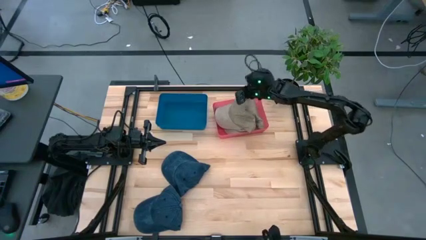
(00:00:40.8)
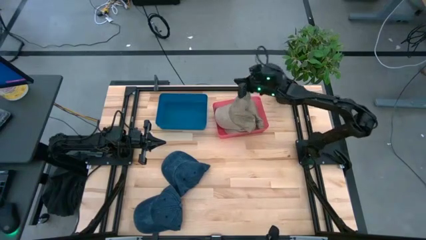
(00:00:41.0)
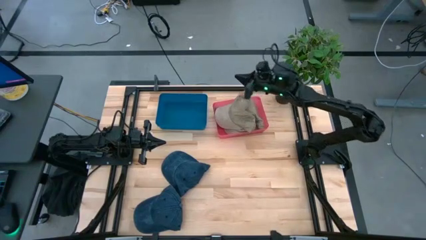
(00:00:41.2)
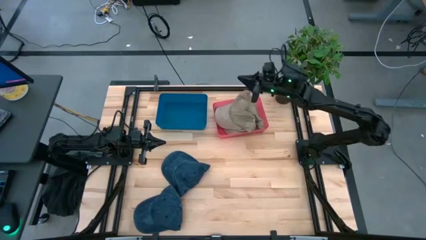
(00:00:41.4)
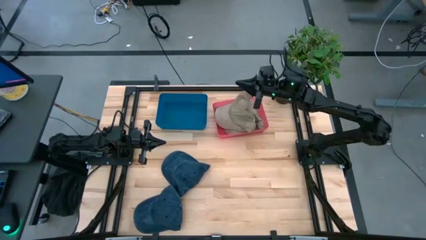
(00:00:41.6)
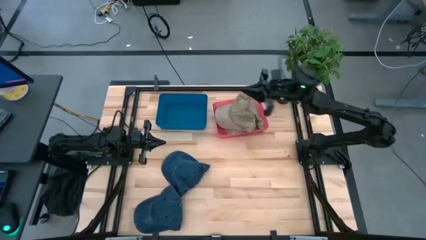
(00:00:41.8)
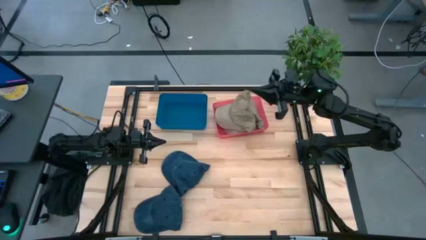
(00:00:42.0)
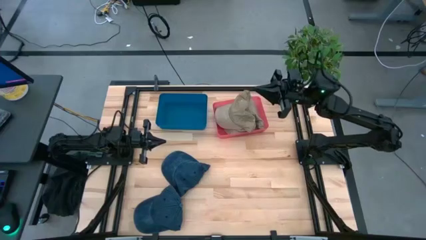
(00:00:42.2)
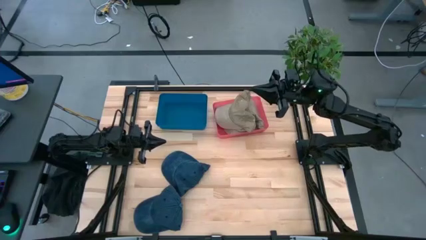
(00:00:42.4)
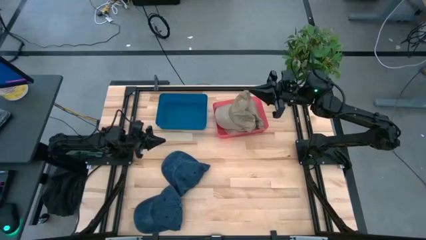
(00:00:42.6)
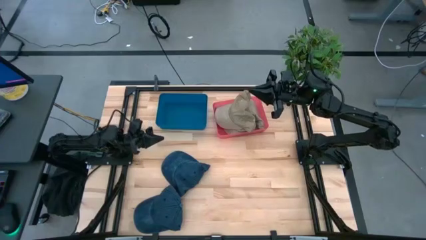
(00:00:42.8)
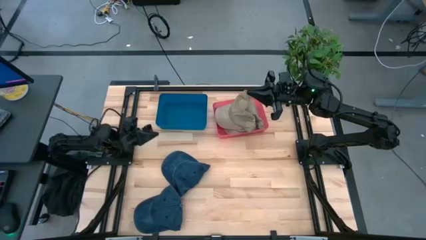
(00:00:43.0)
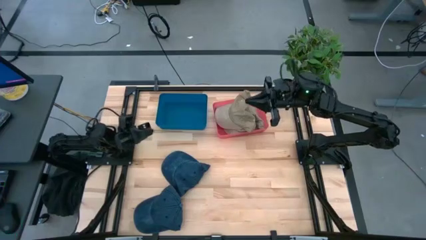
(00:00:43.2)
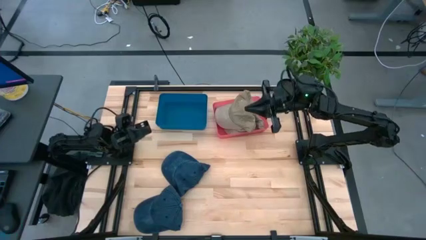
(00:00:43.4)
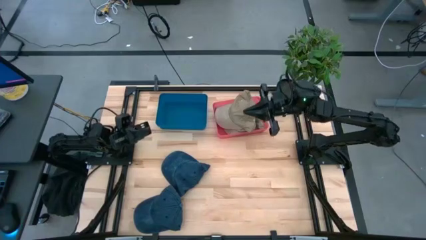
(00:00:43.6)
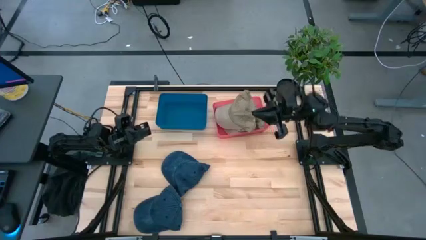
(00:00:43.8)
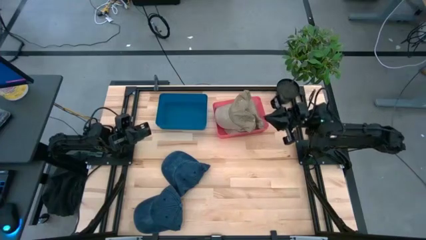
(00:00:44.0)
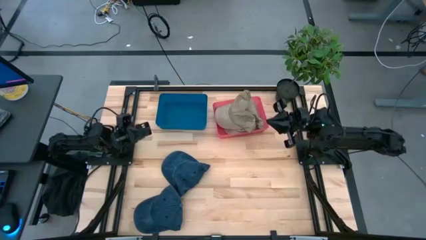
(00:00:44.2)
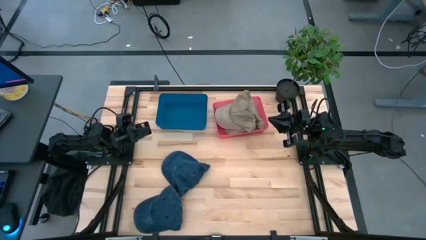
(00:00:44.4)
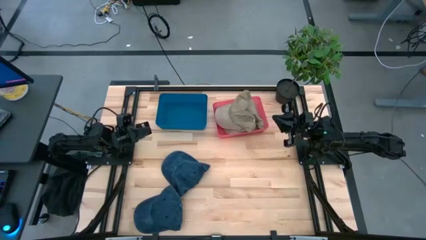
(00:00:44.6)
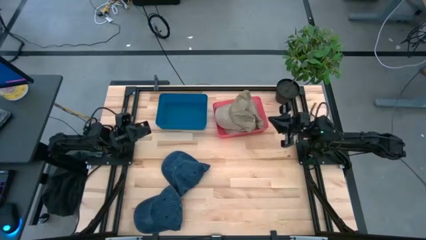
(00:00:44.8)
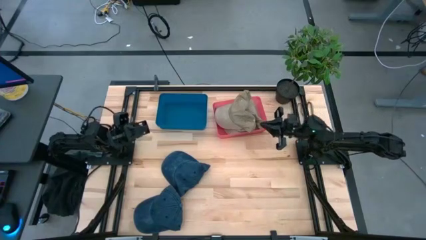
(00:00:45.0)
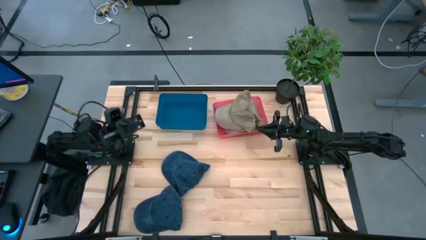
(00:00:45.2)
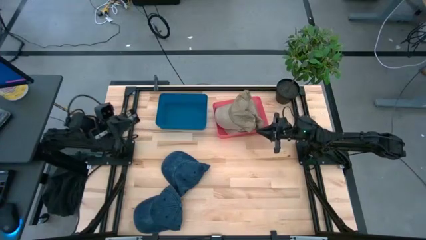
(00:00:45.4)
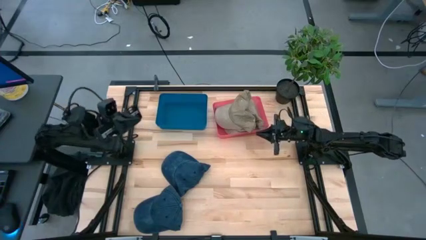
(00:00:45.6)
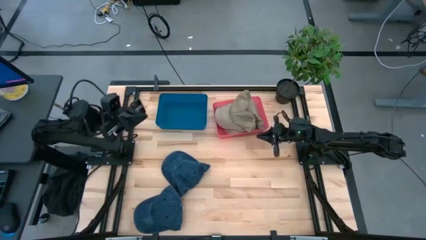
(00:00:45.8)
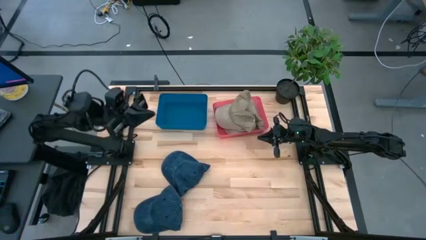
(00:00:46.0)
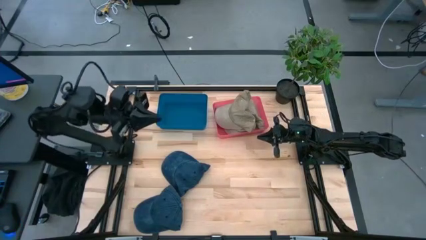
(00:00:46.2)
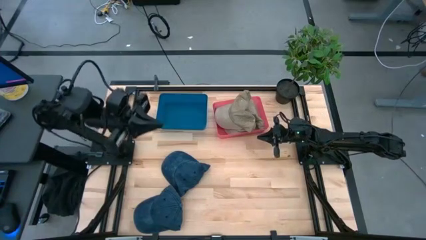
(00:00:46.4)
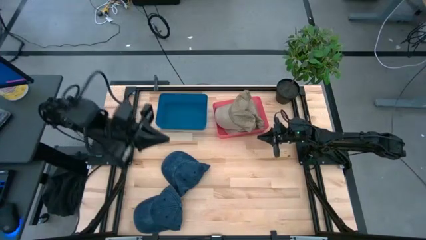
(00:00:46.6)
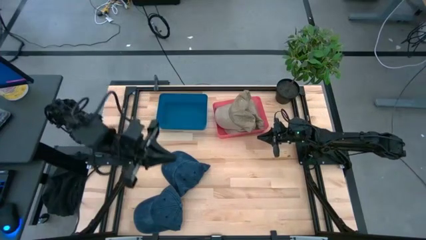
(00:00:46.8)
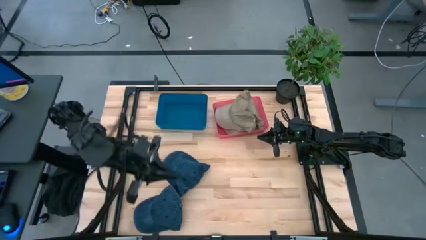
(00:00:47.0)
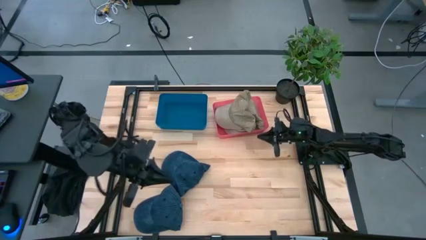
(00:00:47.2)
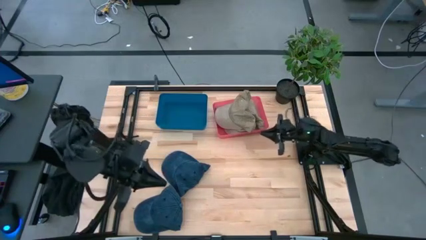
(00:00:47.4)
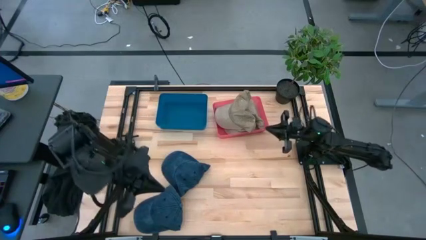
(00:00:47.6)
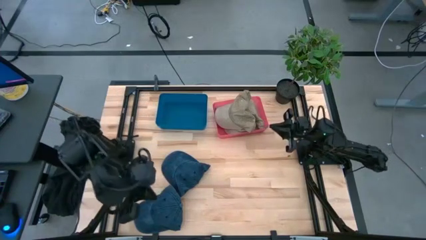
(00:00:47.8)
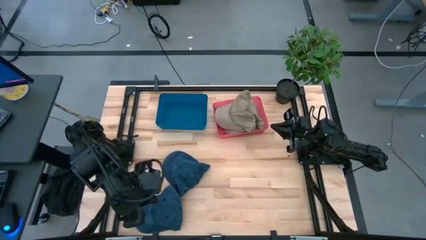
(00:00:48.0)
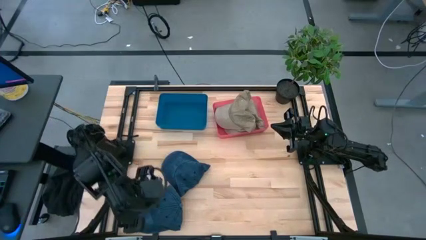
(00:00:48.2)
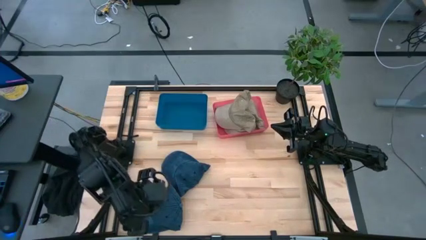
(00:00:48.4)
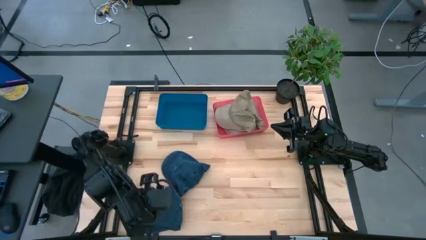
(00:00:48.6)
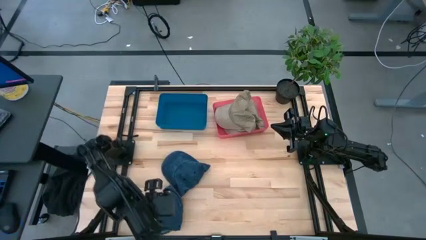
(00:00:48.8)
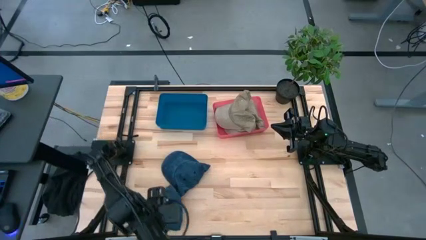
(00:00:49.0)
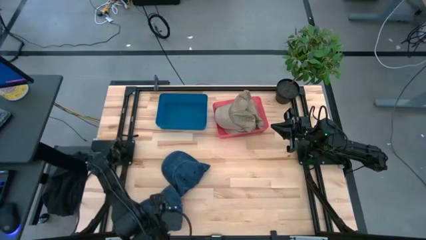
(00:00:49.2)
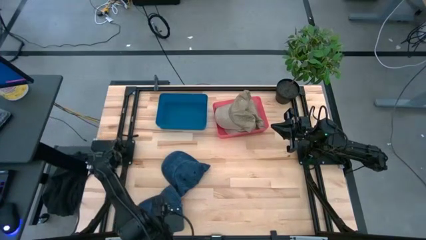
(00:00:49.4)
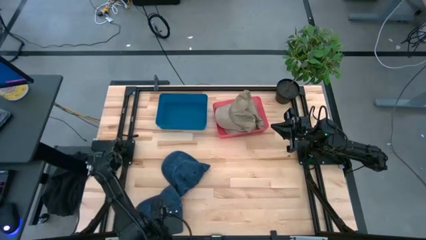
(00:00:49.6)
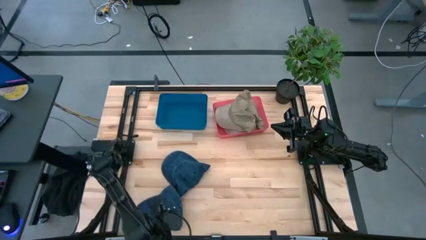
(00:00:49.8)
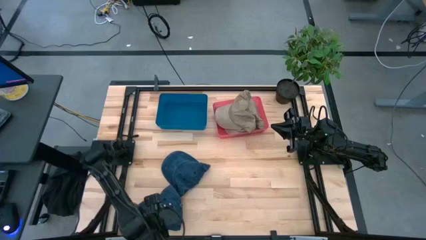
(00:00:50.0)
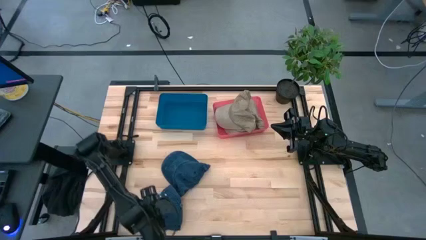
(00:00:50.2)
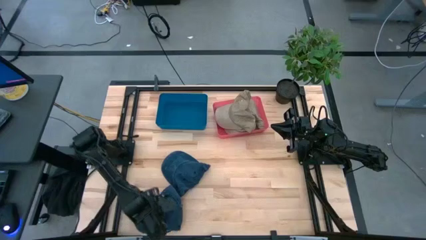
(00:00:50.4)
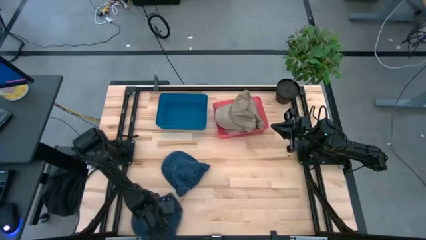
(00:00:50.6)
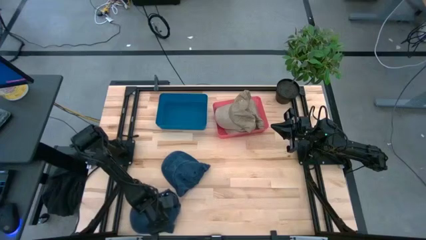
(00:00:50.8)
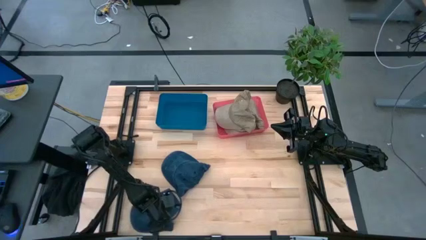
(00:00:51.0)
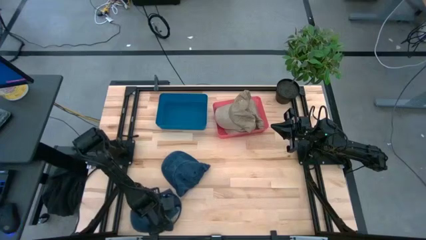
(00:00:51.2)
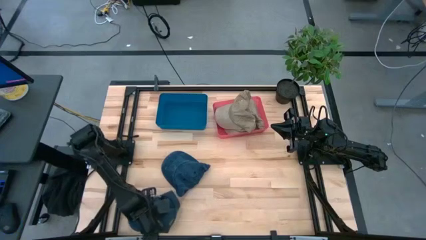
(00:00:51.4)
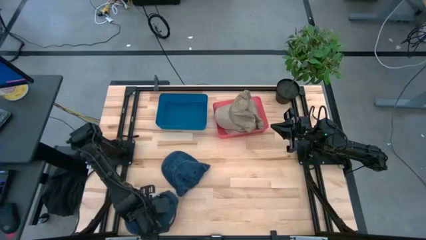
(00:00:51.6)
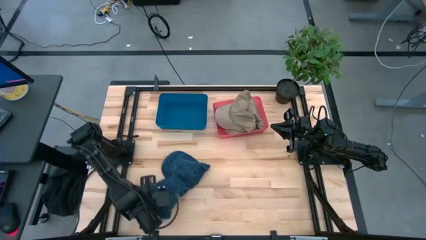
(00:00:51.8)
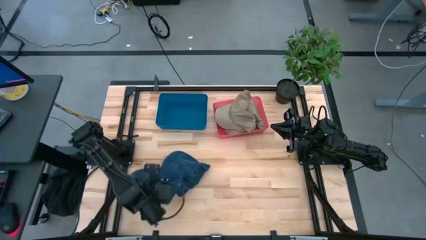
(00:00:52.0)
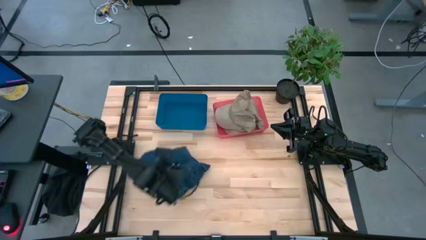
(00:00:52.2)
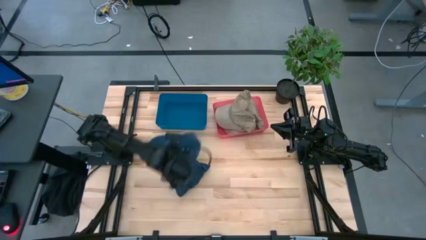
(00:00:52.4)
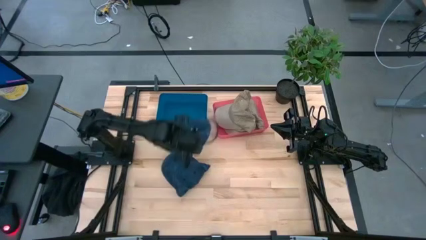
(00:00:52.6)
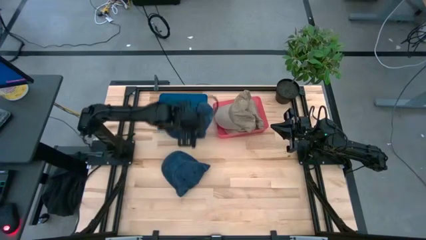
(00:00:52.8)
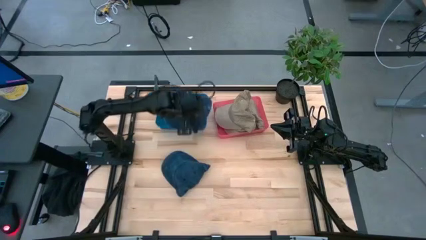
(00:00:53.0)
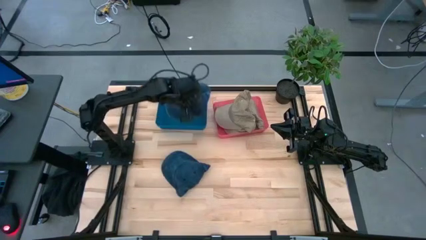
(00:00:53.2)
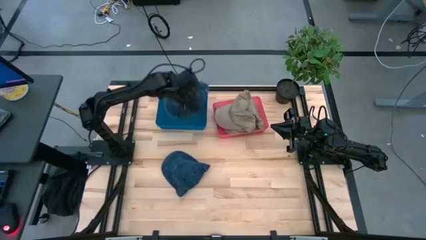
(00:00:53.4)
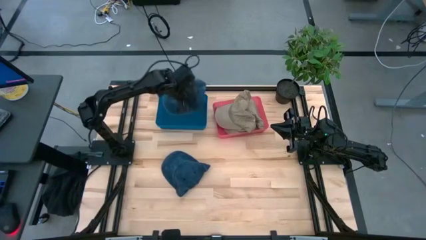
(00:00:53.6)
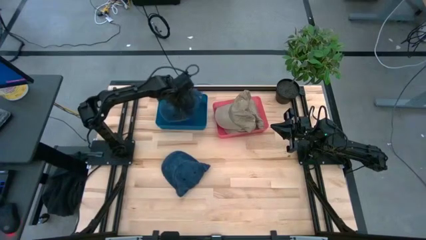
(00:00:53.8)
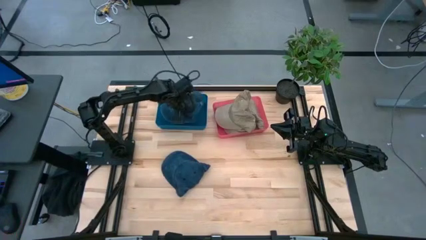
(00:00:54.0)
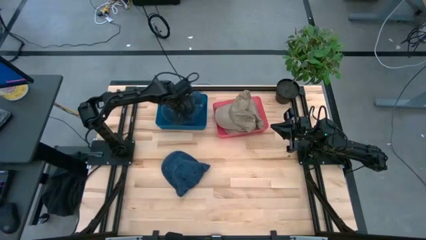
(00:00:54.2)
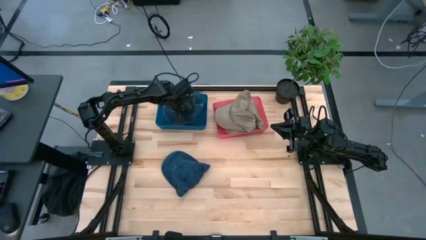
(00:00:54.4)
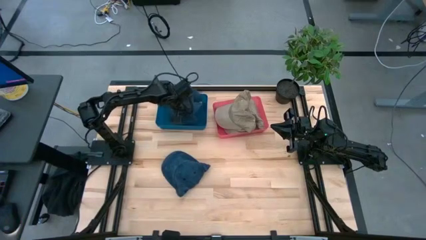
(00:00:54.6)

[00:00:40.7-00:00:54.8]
Task: Pick & Place hat
Put the bottom dark blue cap into the blue bin
